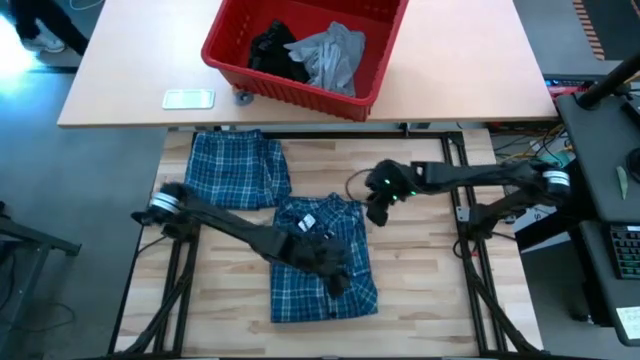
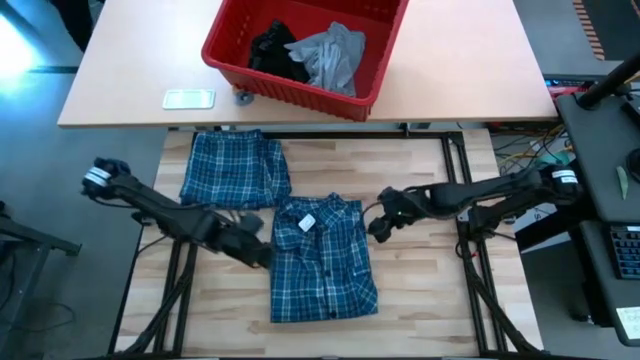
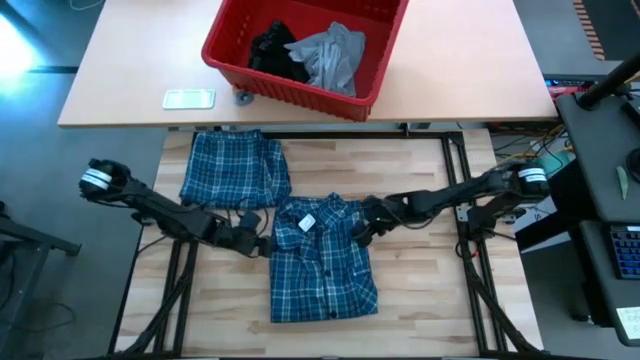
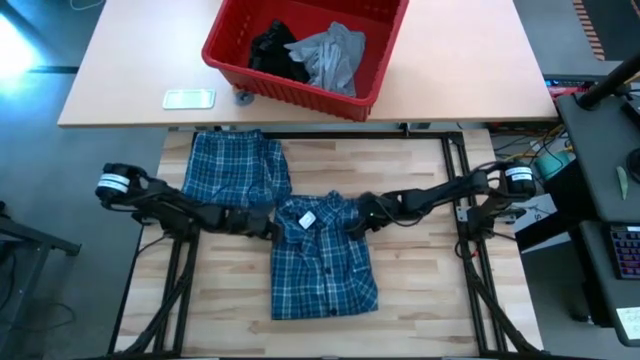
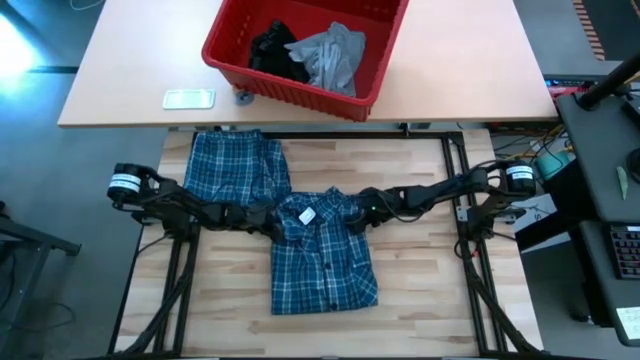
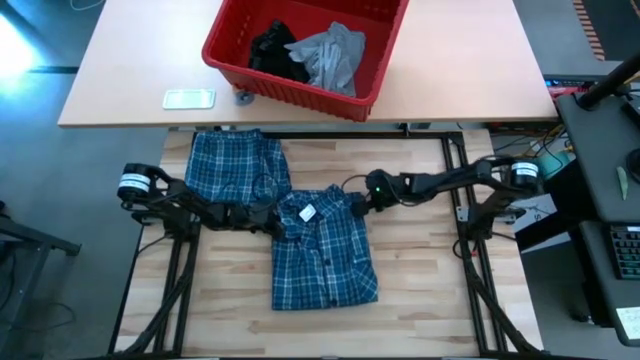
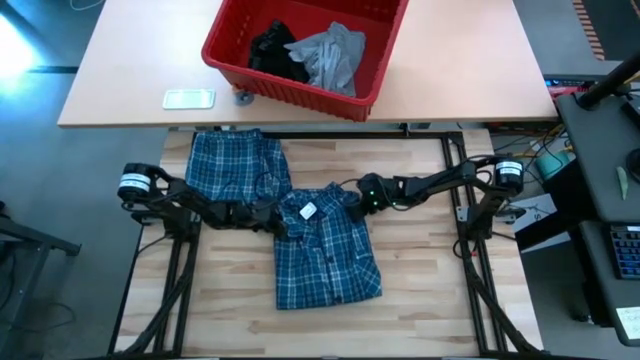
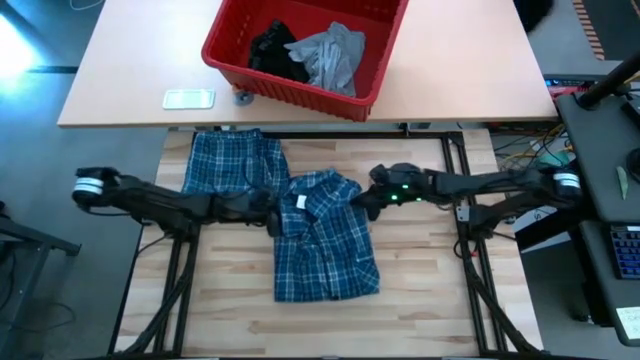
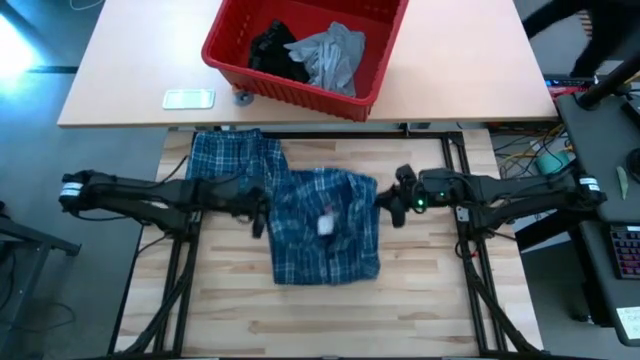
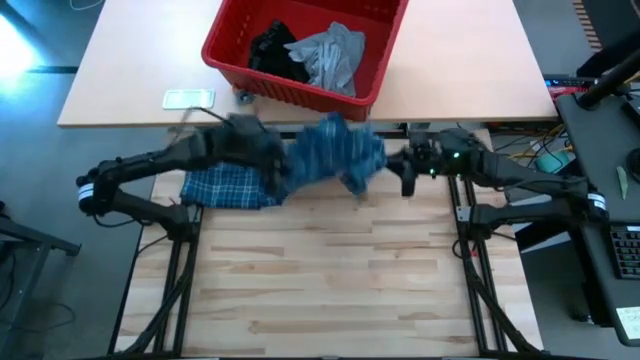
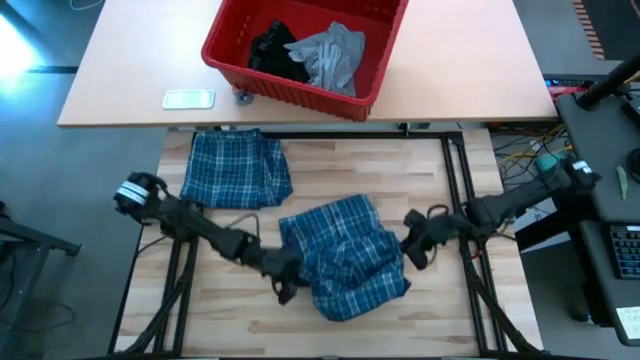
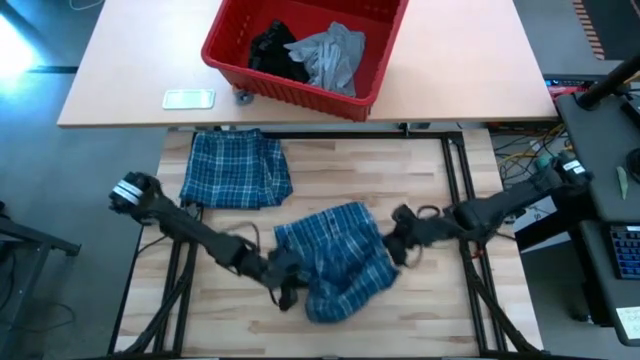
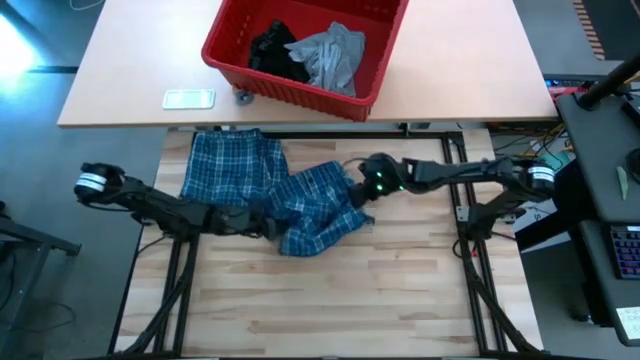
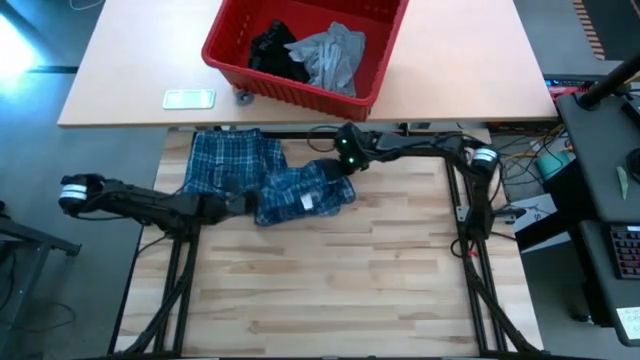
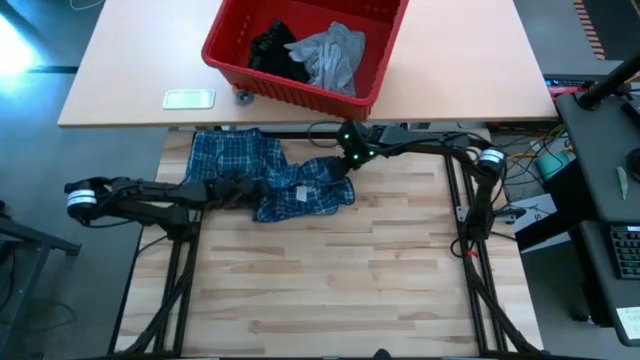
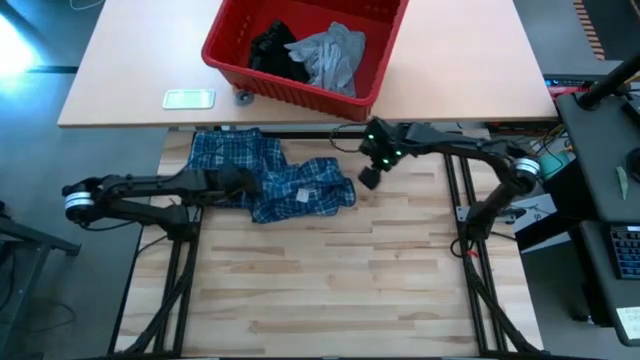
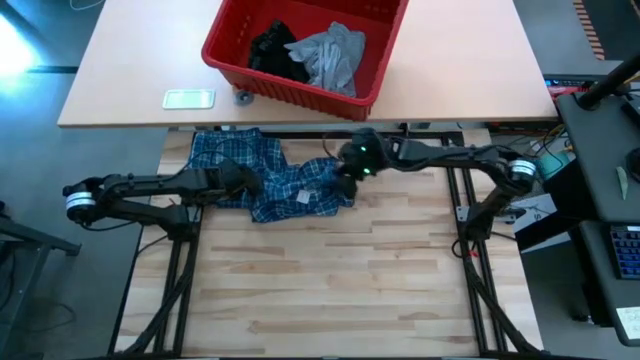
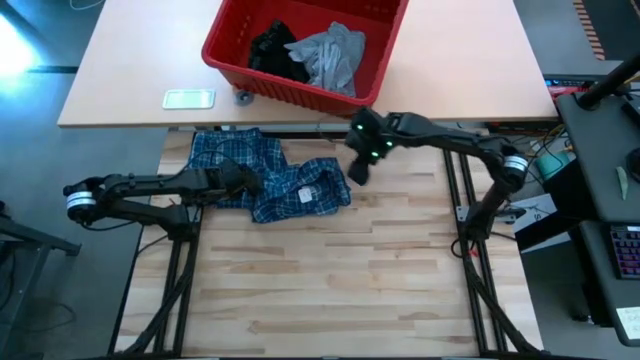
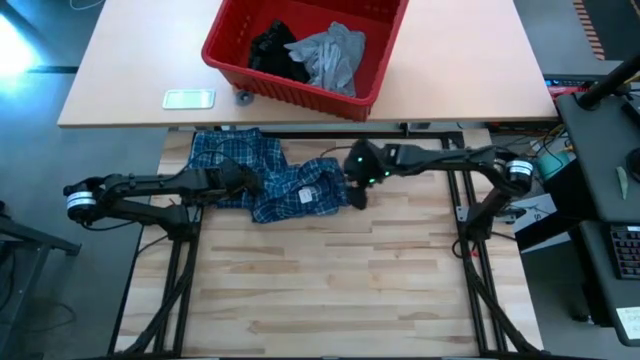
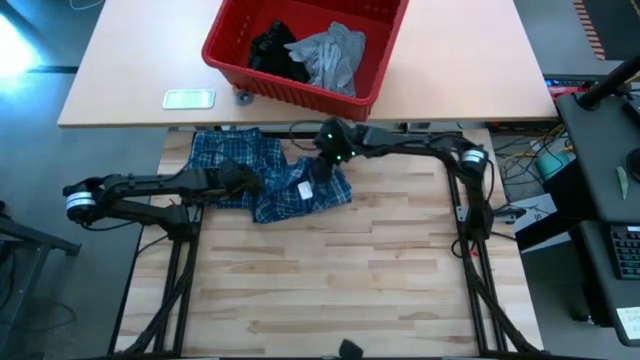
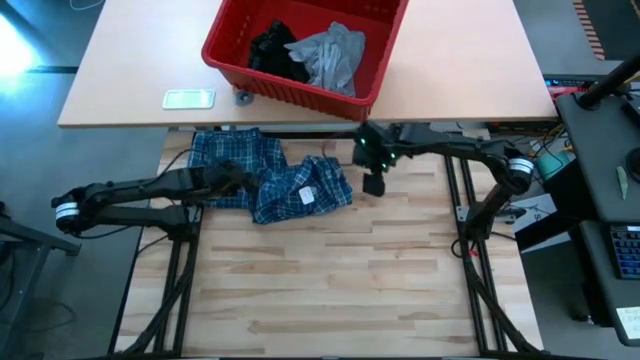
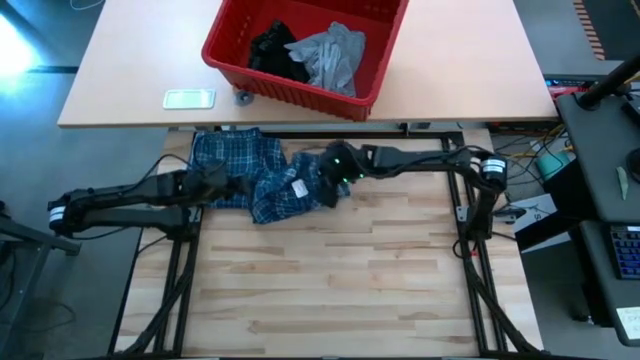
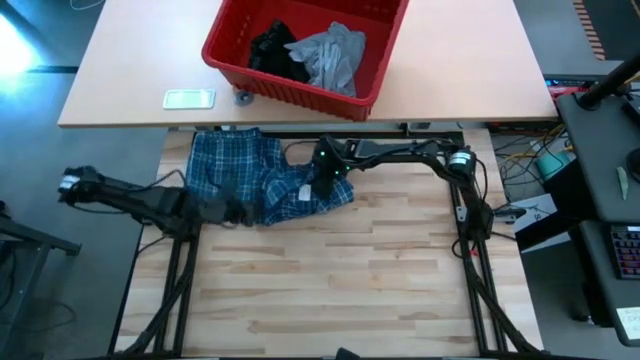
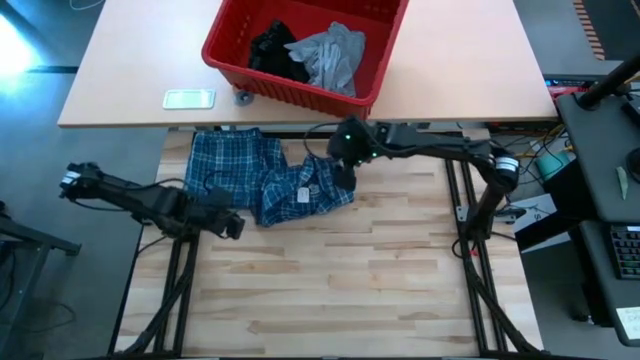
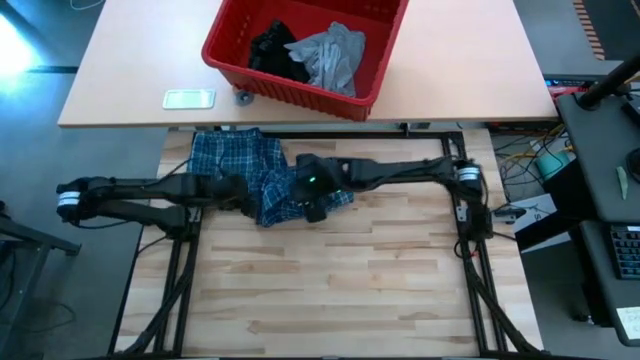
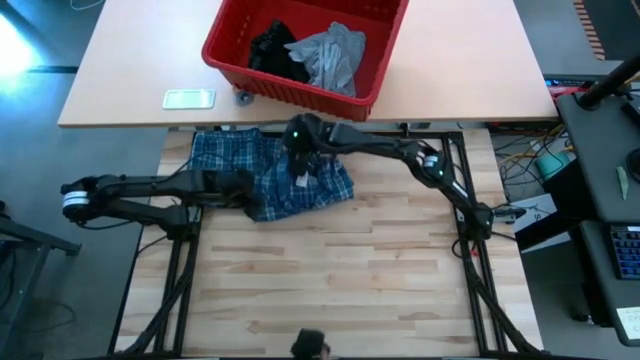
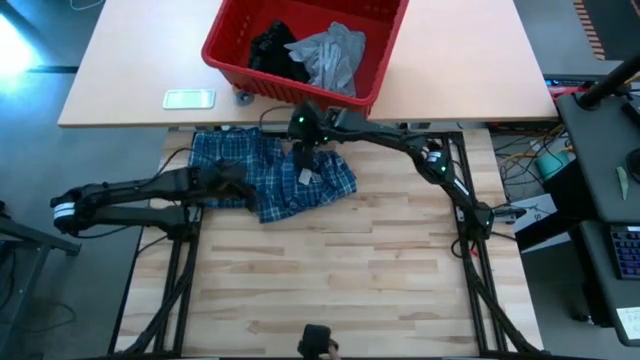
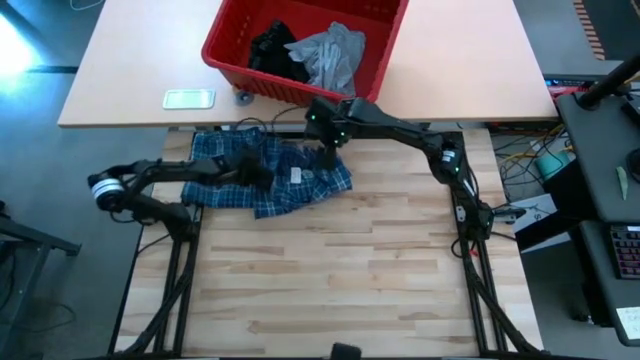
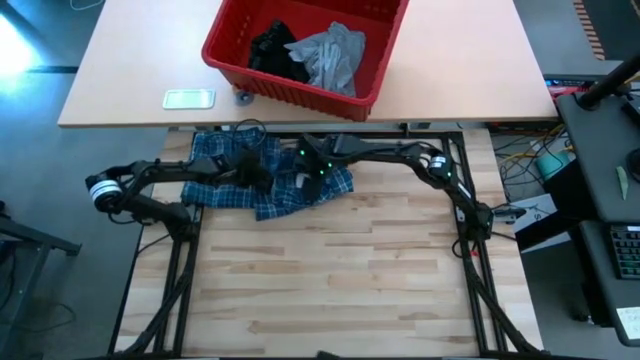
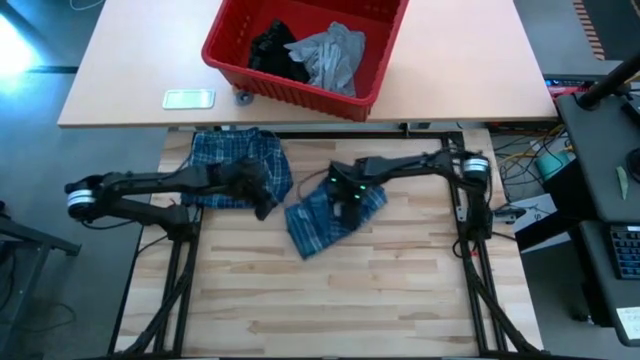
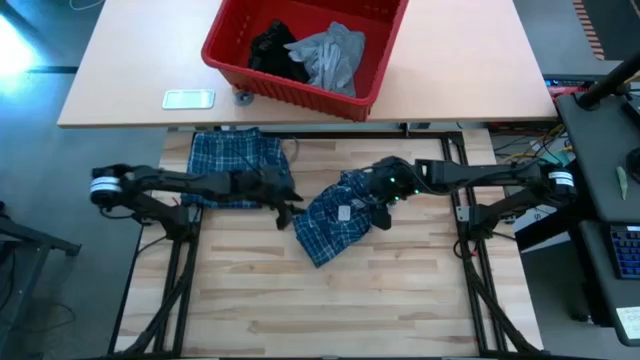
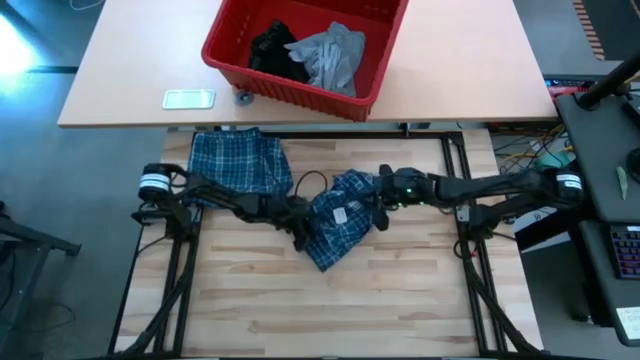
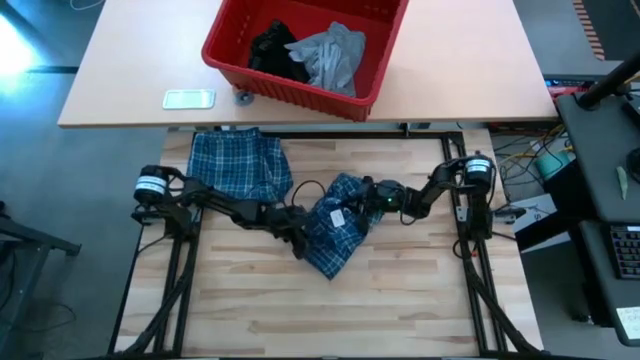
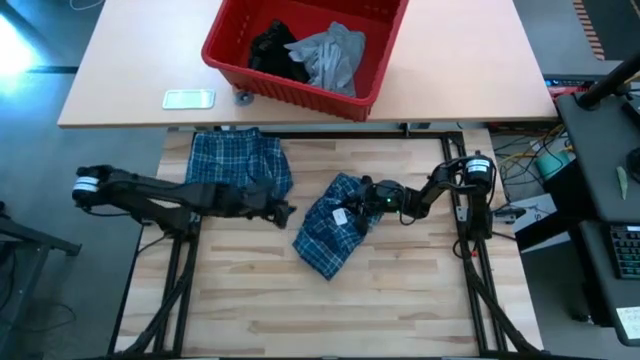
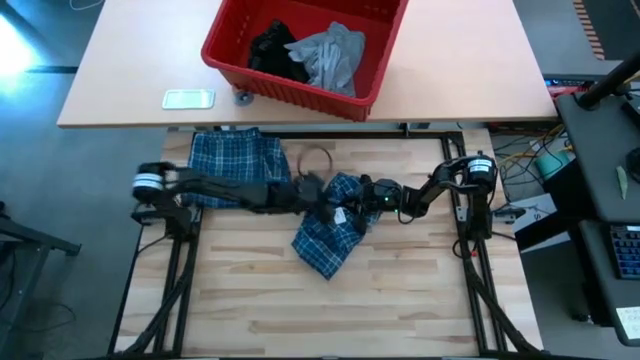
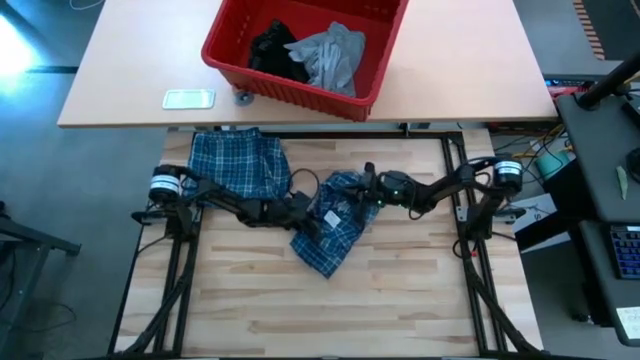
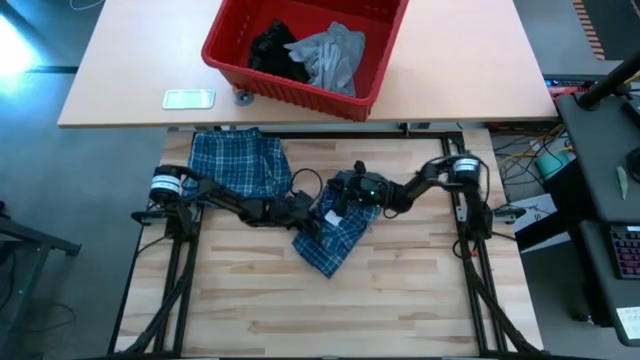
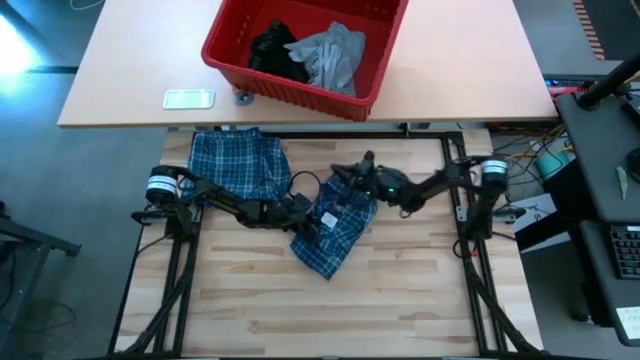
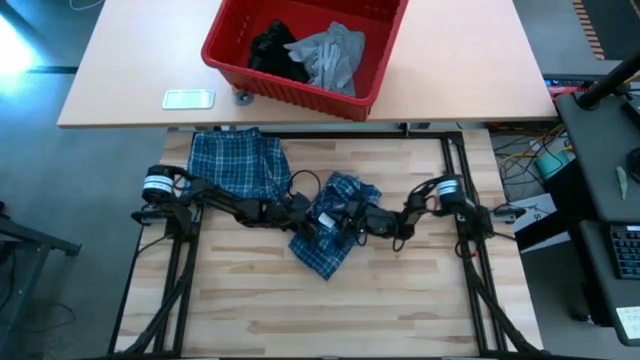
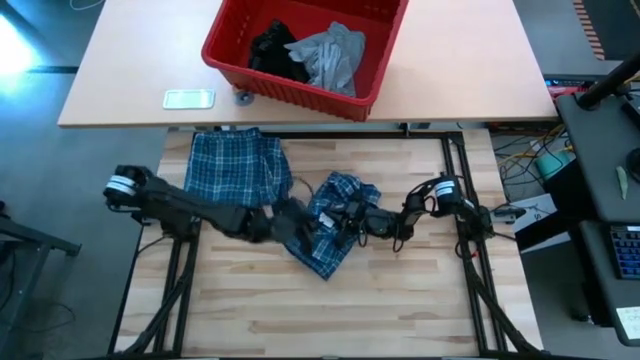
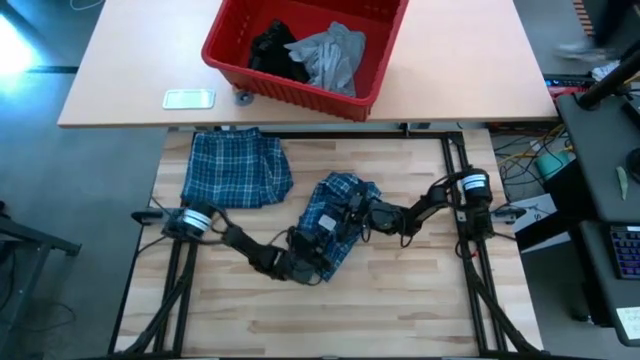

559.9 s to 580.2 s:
Task: Fold Laundry from Bin
Fold the blue patterned long sleeve shirt
